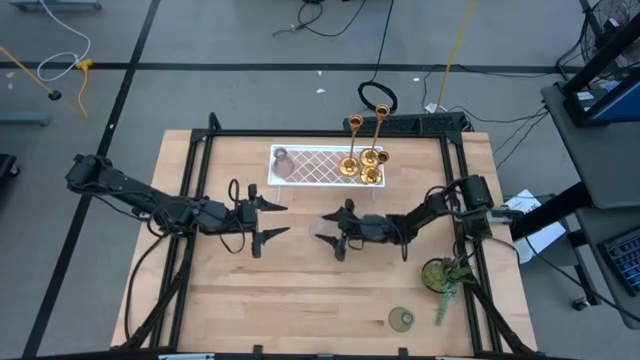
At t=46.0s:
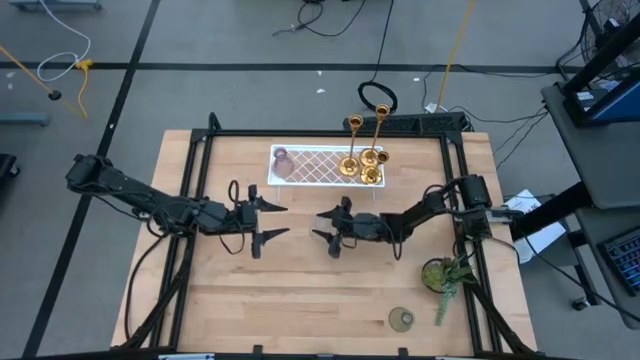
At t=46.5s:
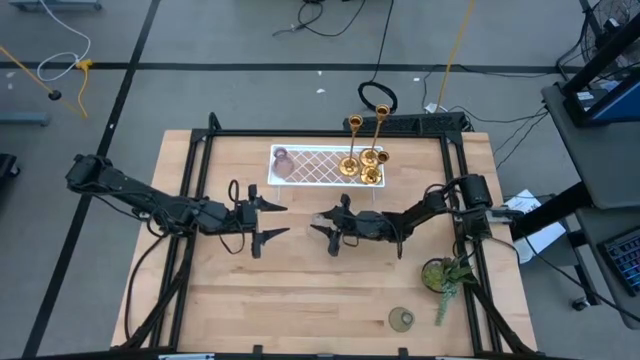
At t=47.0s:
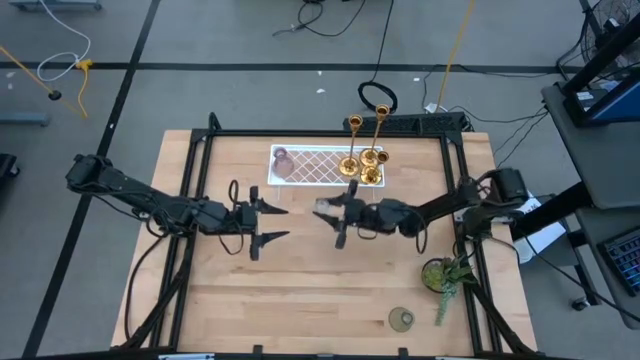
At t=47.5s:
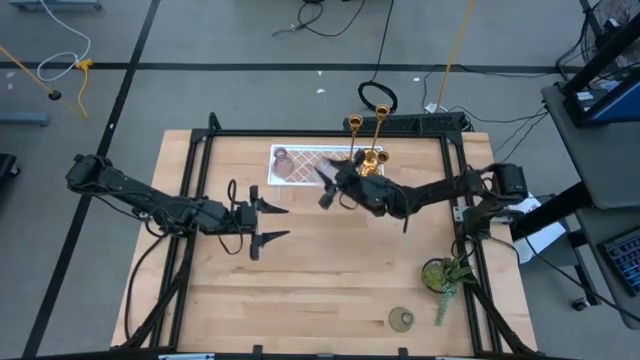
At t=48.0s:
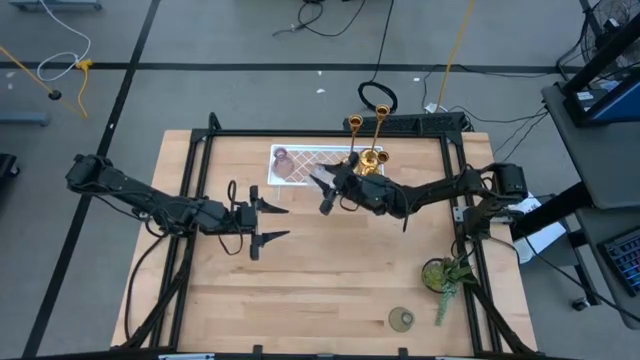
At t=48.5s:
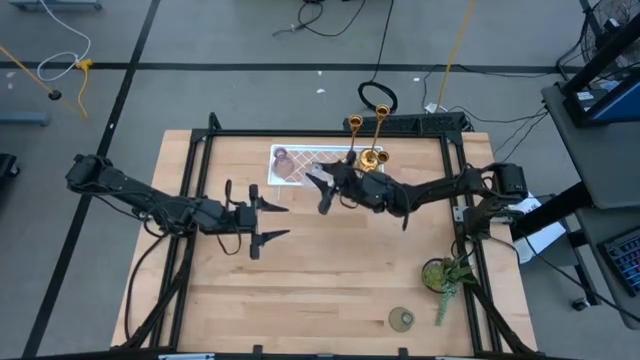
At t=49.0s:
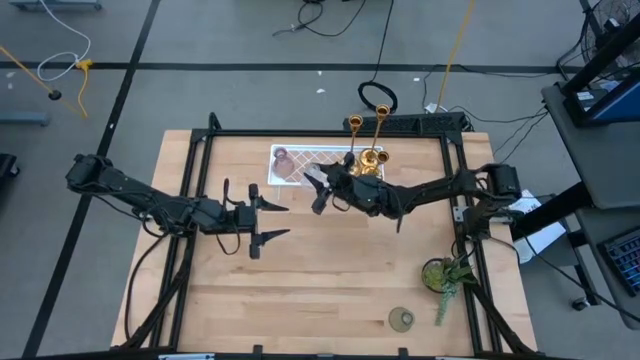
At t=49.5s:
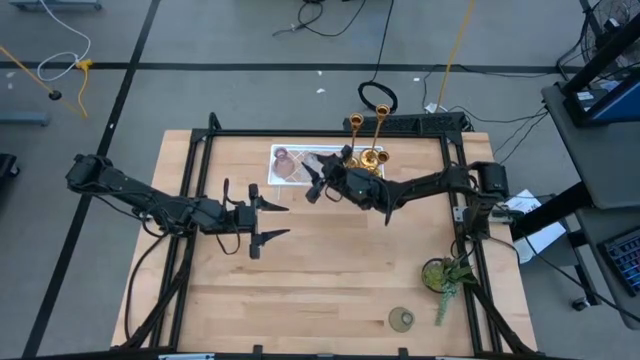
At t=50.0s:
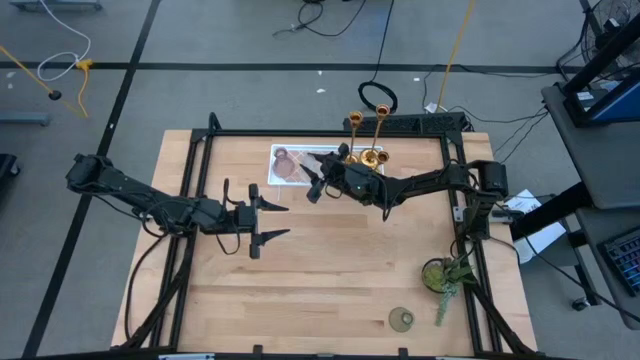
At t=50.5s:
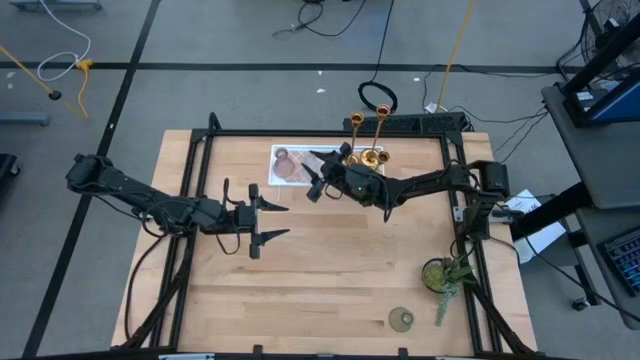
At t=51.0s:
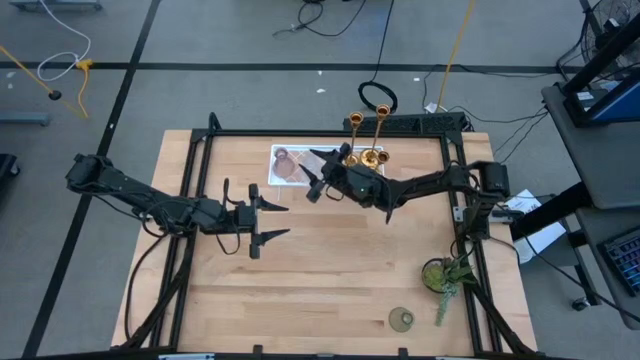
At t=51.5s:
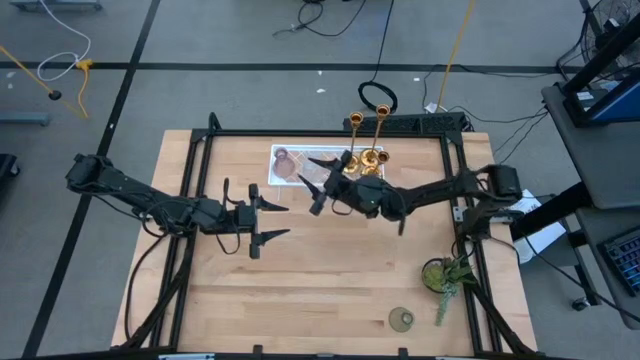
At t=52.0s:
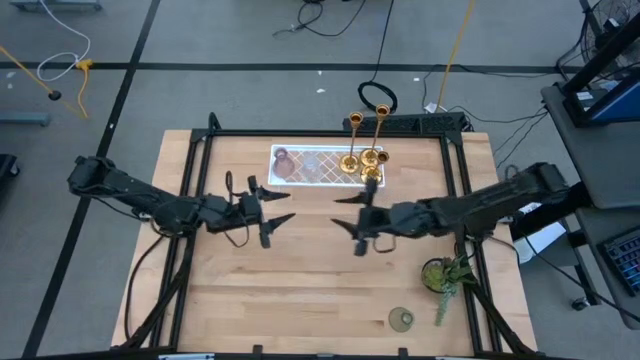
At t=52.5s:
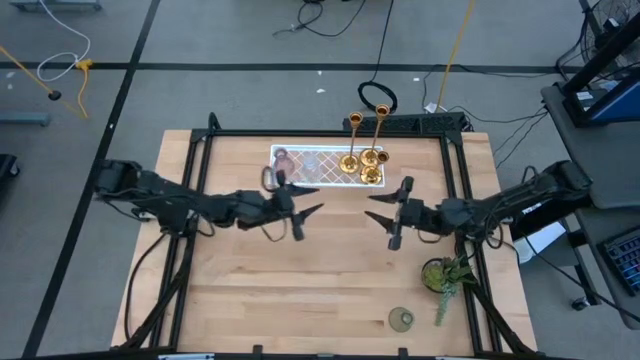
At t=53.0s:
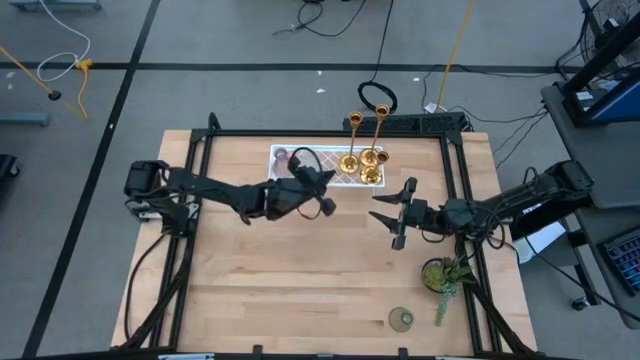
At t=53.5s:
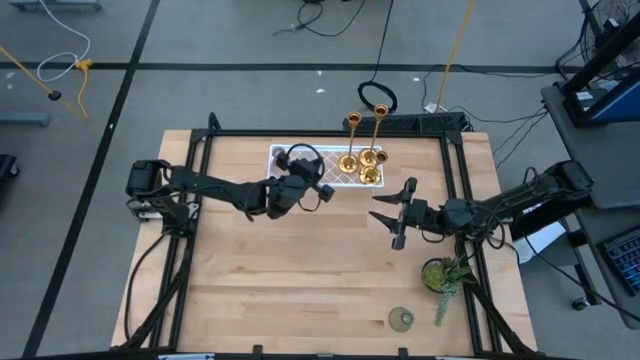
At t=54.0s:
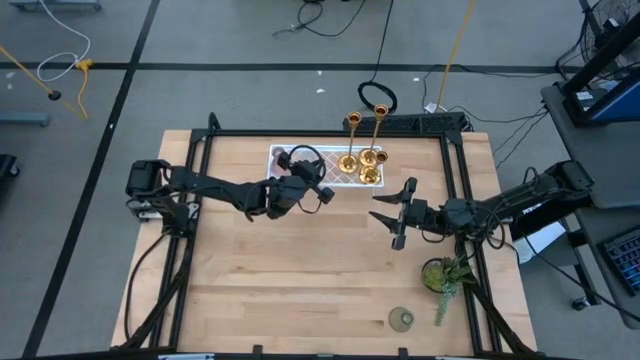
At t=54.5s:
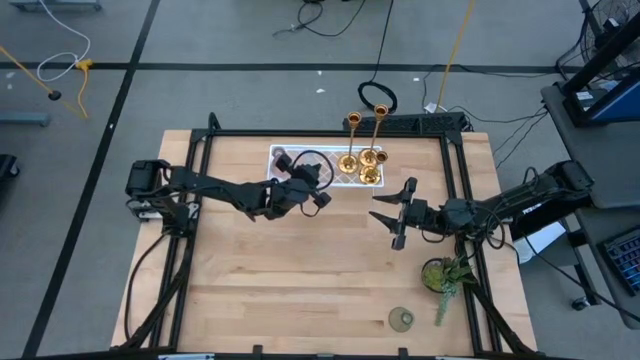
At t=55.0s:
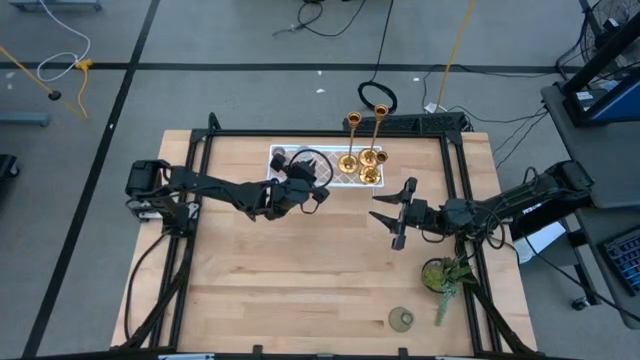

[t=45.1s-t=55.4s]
Task: Pick & Place candle stick holders
Put the transparent glass candle holder on the shelf

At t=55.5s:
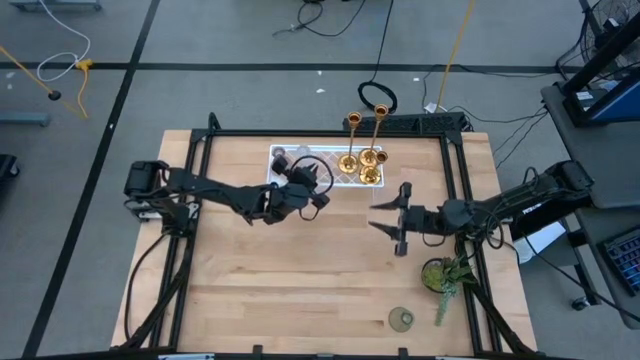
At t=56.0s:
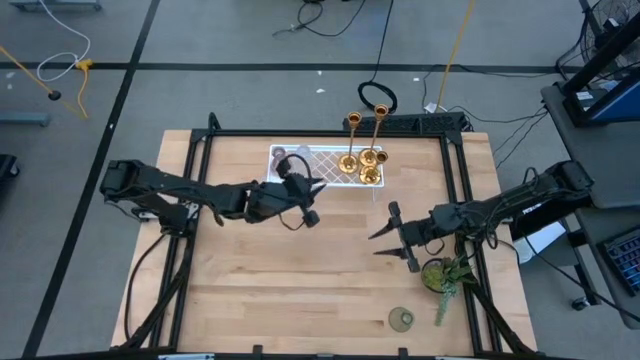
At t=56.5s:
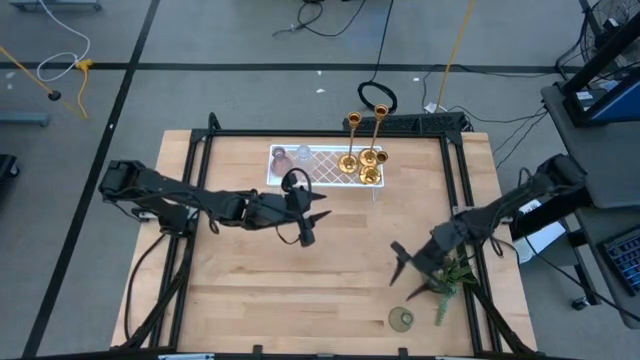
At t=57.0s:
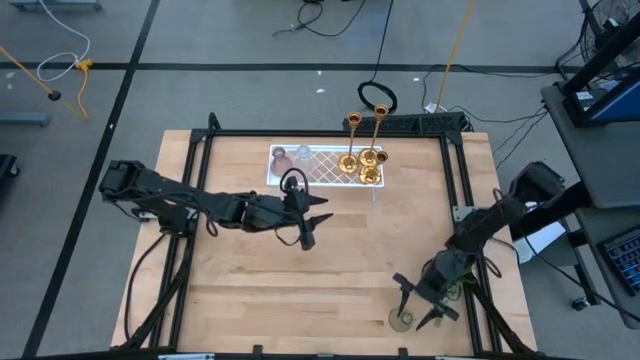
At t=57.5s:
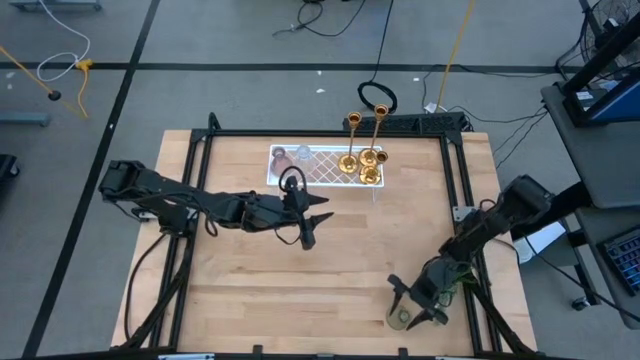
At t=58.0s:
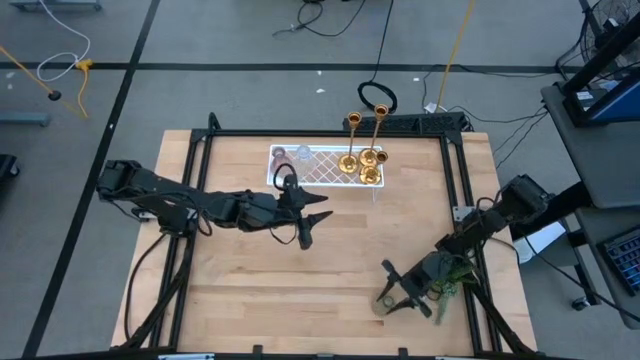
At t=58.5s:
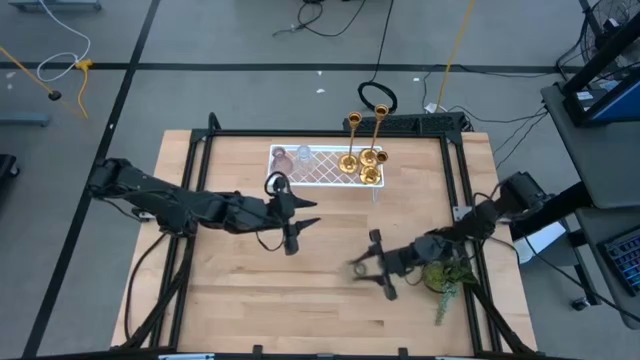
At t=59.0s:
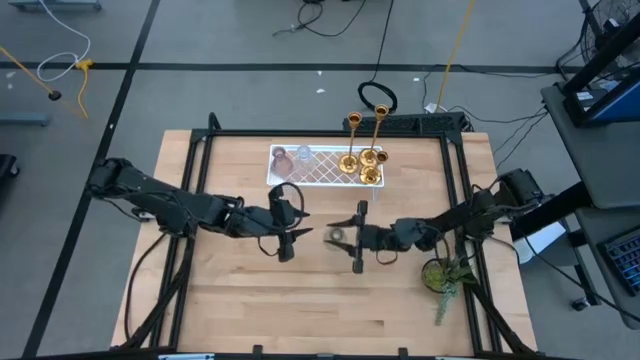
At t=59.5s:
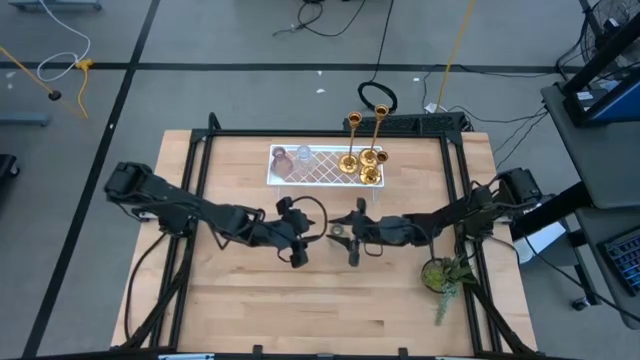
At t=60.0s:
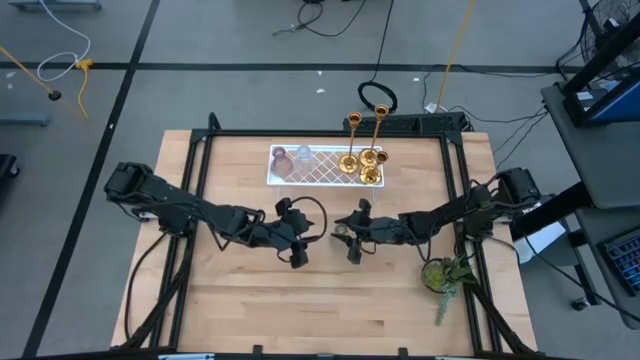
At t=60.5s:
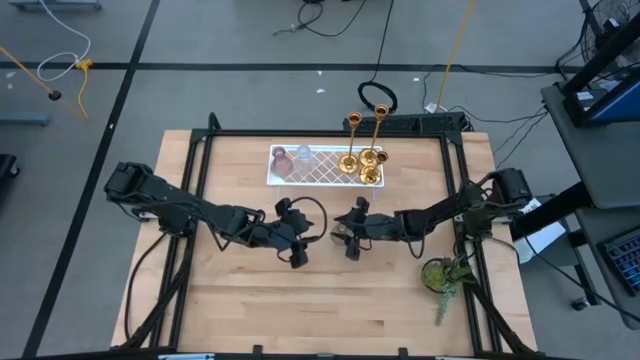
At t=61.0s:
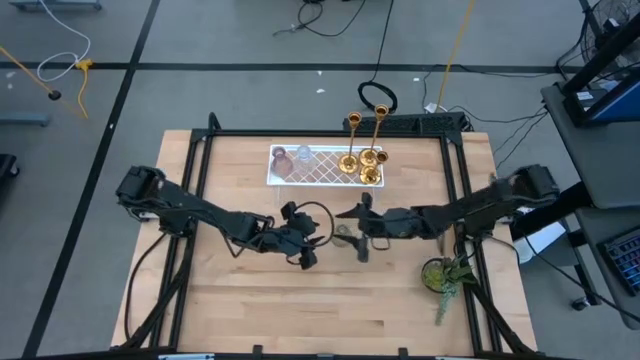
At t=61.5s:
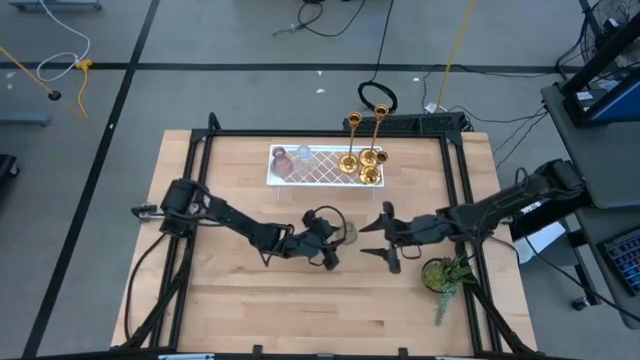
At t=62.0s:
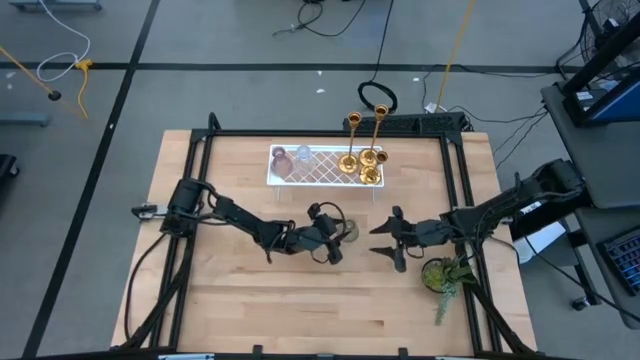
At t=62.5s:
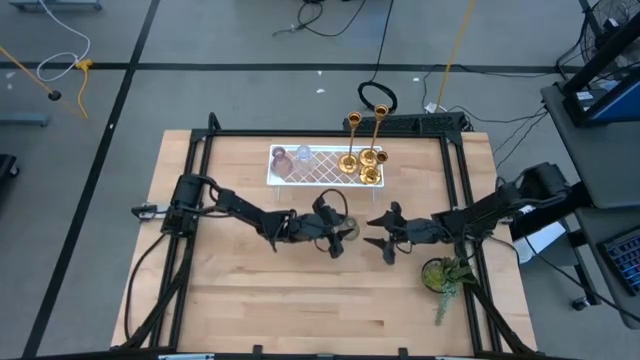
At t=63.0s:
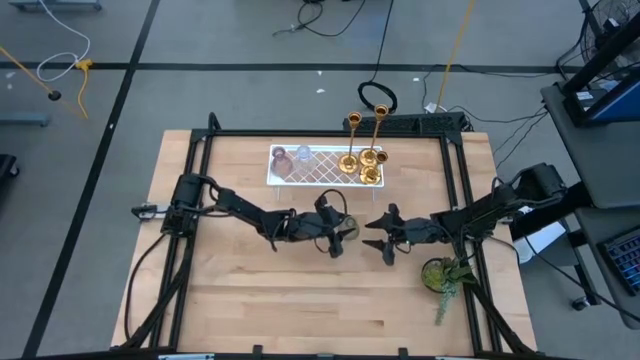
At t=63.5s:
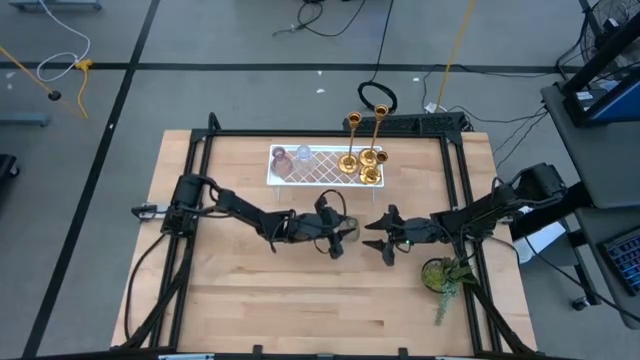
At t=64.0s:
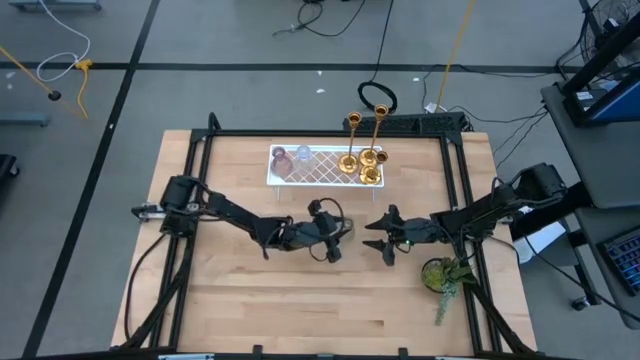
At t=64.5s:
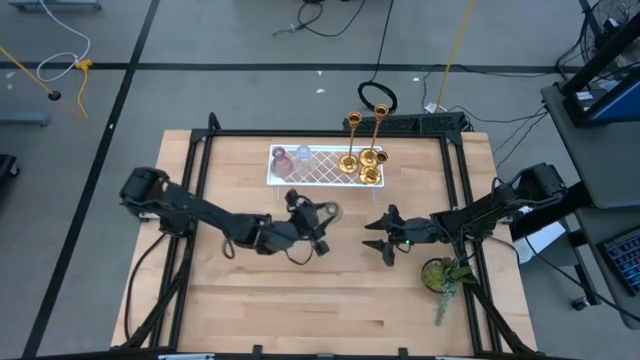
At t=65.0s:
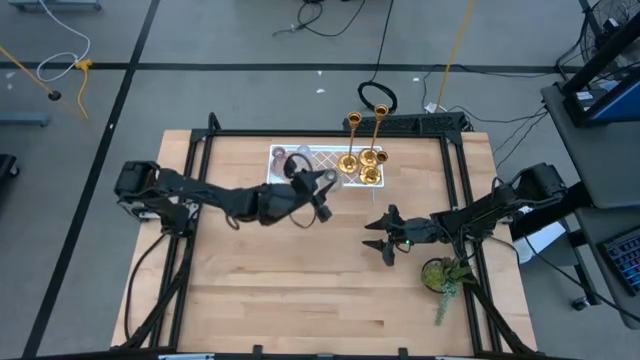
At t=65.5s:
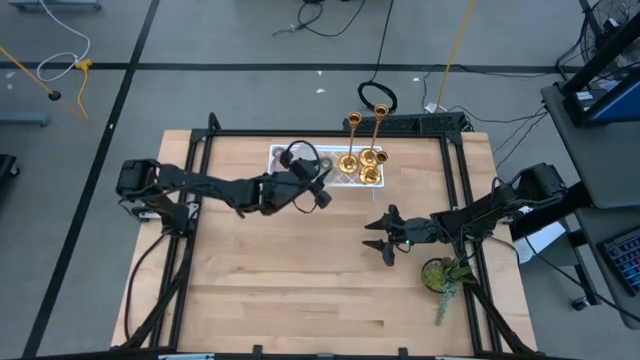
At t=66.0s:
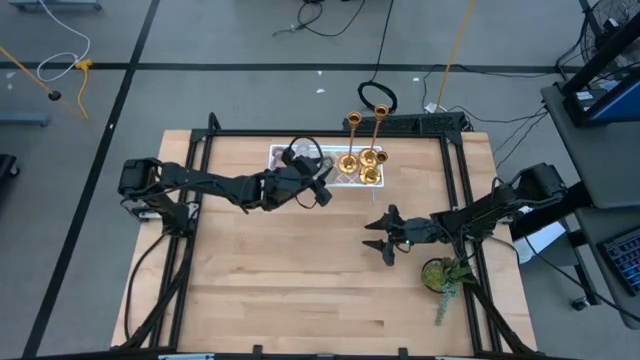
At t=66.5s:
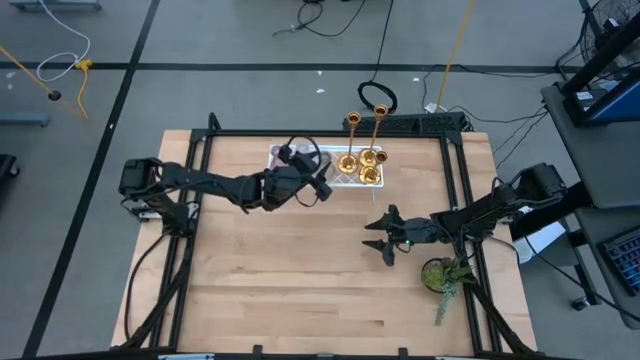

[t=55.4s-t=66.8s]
Put the green glass candle holder on the shelf

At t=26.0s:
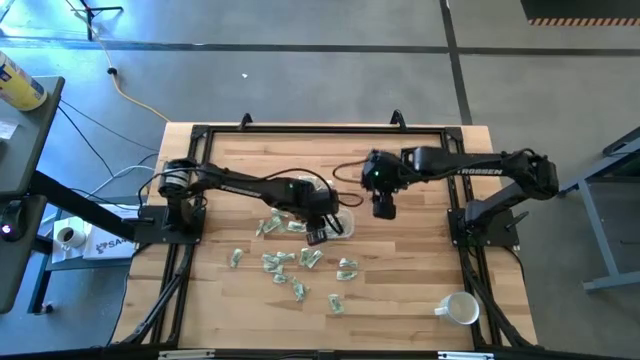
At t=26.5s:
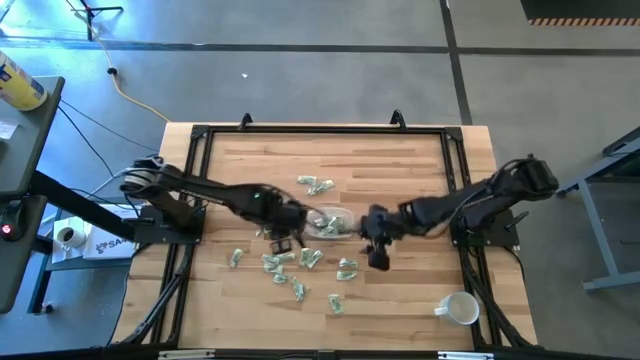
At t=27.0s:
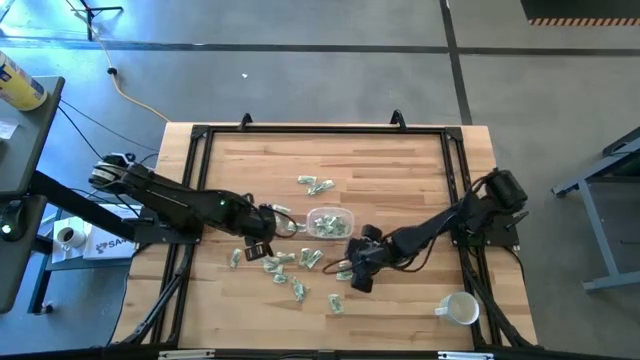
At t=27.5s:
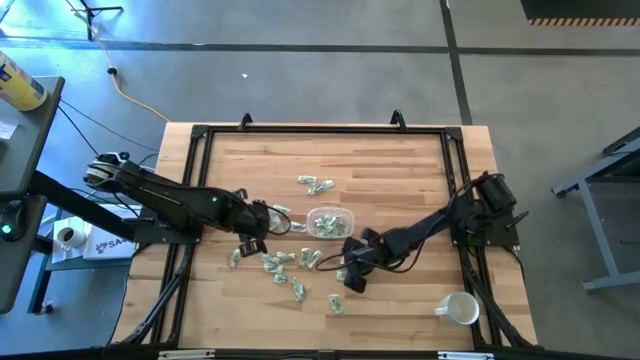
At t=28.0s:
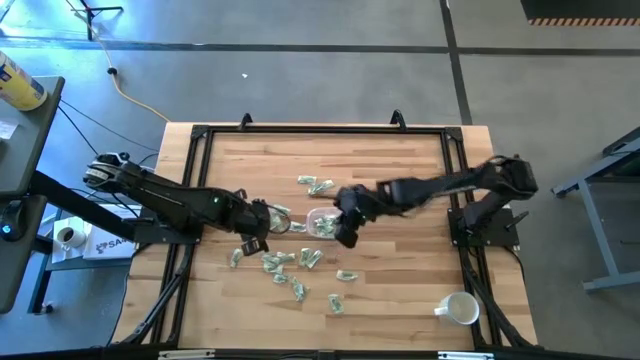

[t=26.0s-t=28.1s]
Task: Pick and place Stevia / Truvia into bins
Put the stevia packet into the transparent container
